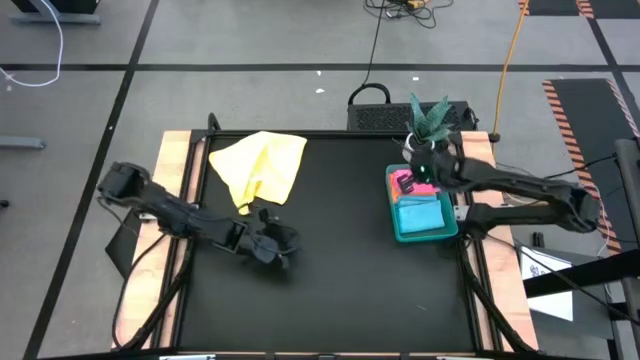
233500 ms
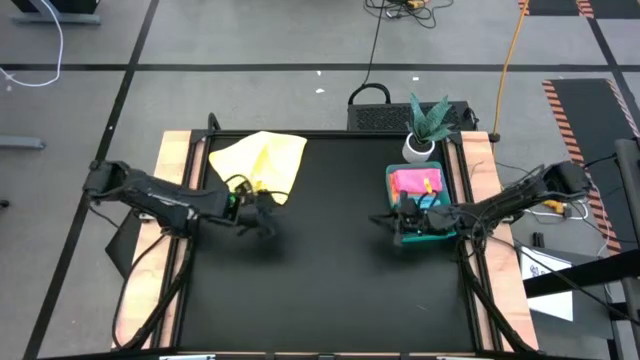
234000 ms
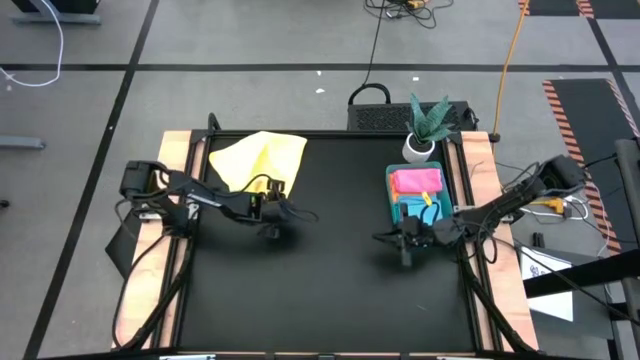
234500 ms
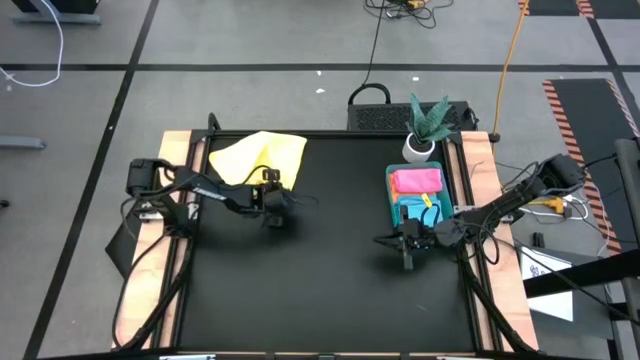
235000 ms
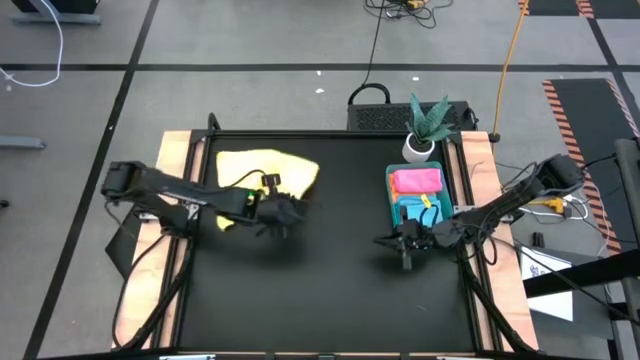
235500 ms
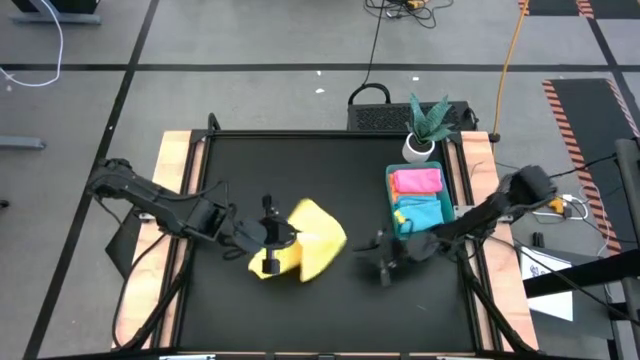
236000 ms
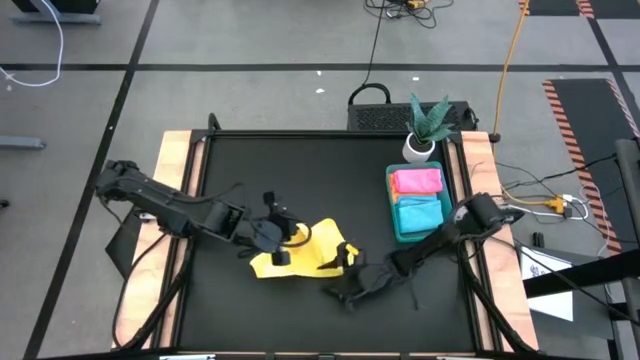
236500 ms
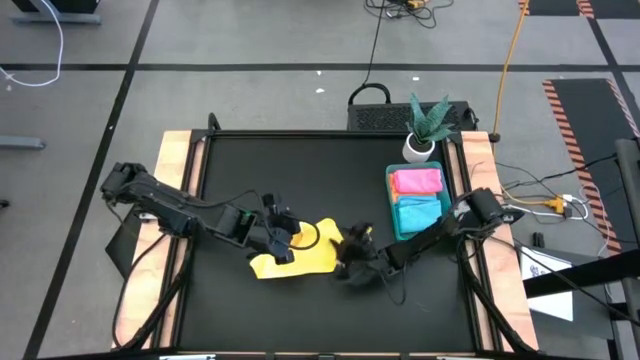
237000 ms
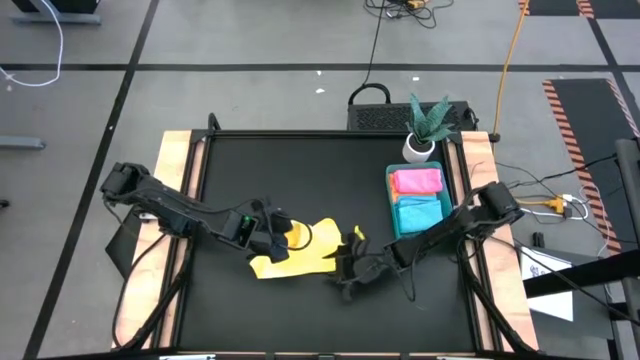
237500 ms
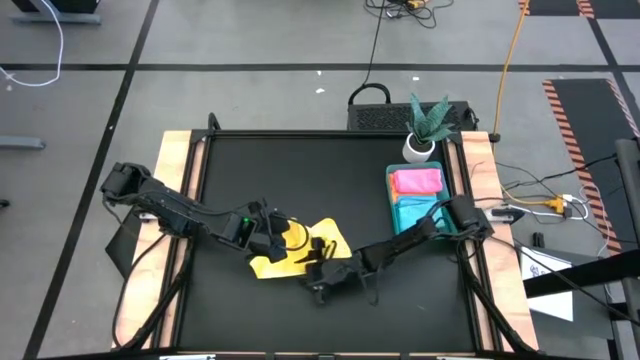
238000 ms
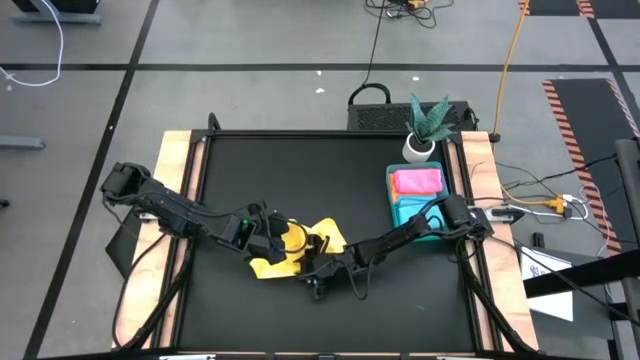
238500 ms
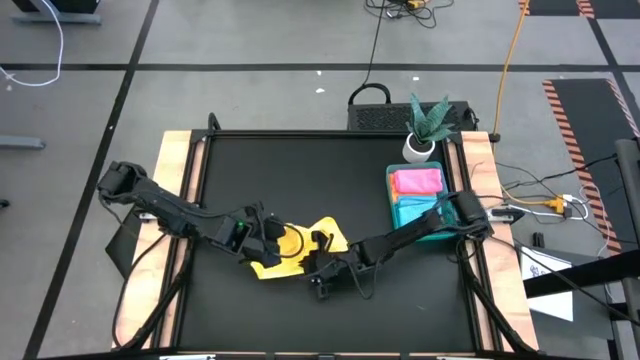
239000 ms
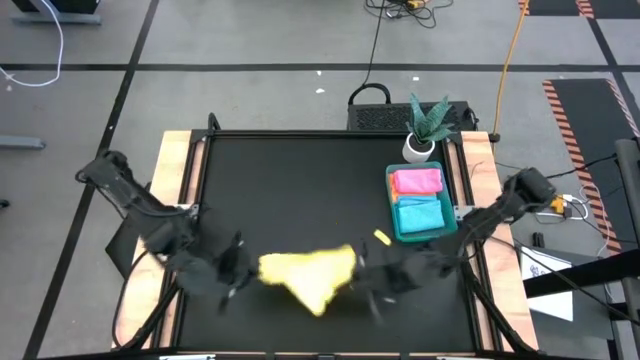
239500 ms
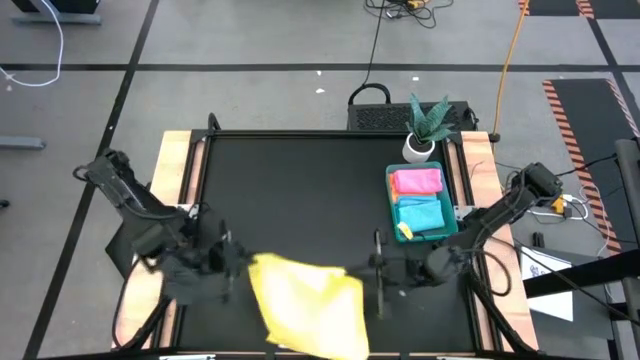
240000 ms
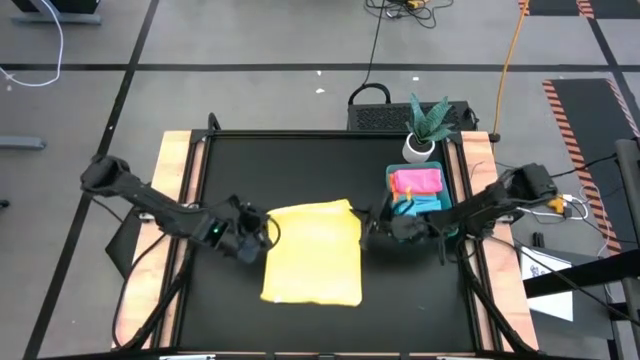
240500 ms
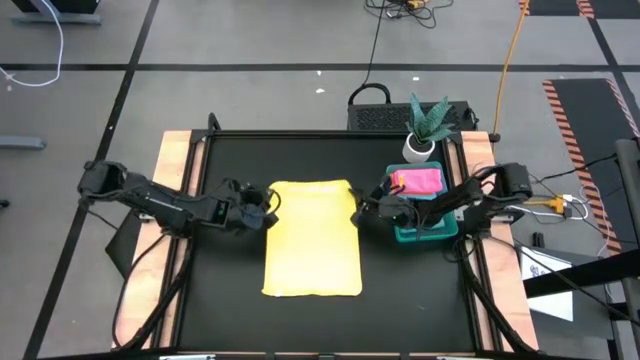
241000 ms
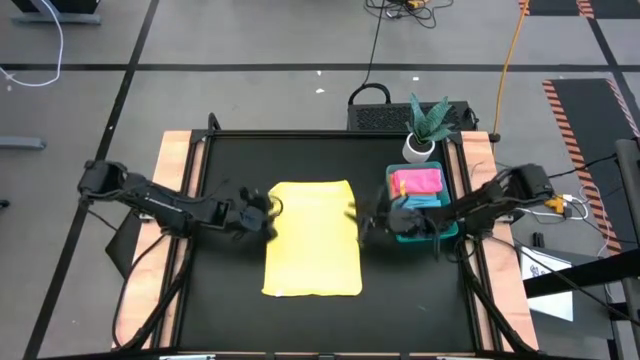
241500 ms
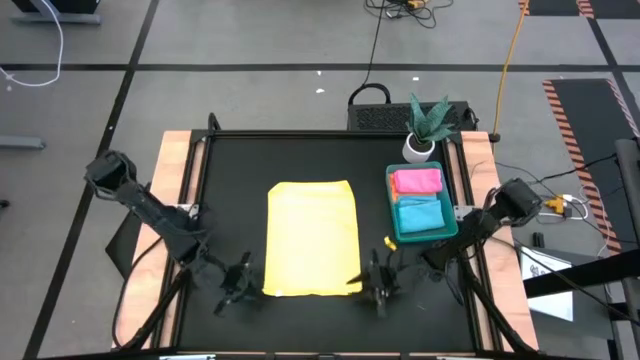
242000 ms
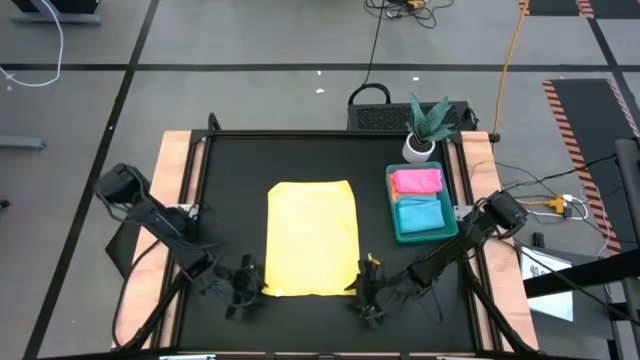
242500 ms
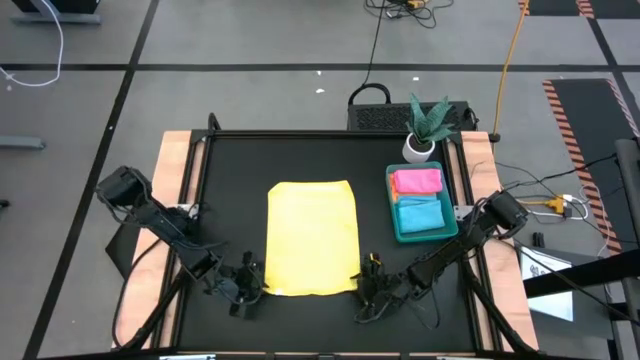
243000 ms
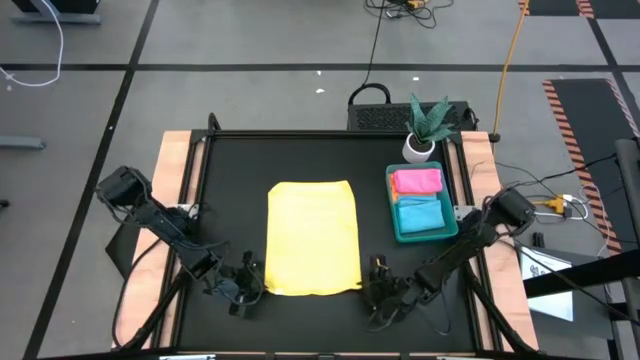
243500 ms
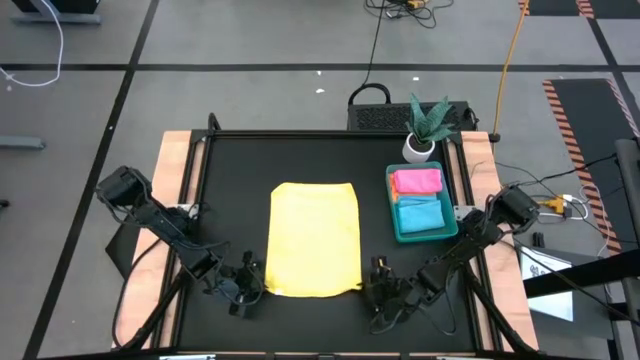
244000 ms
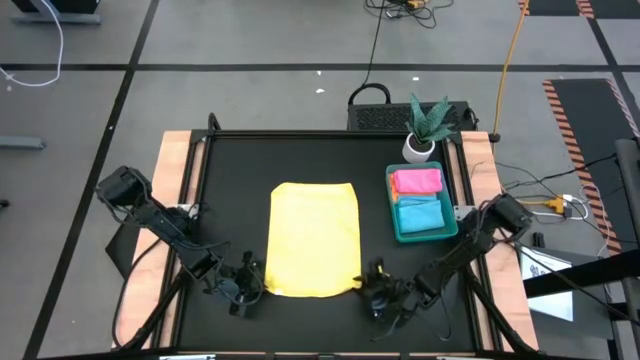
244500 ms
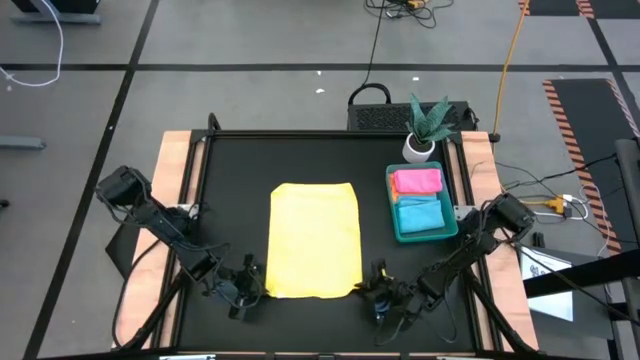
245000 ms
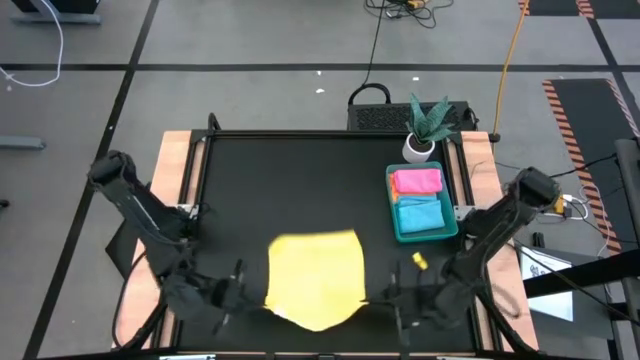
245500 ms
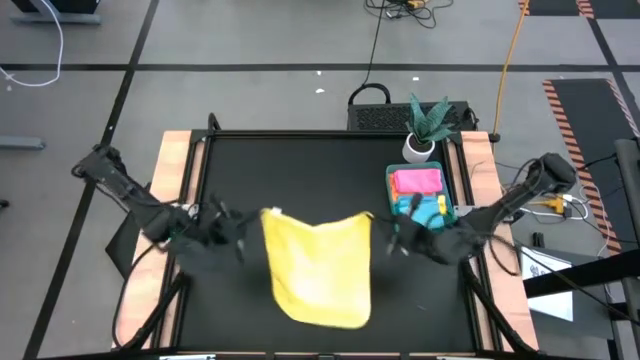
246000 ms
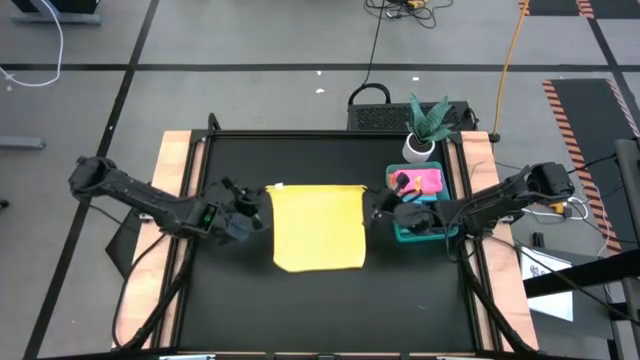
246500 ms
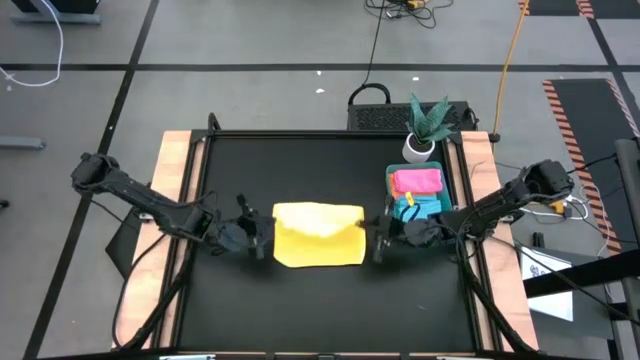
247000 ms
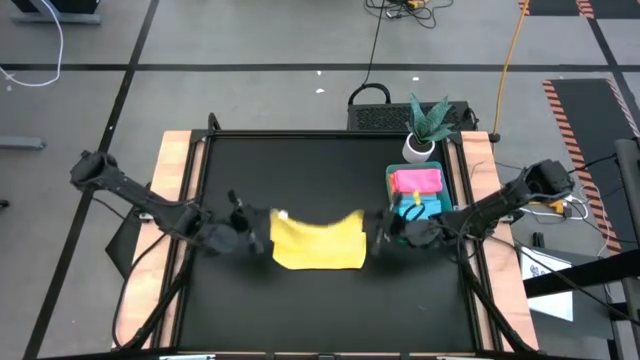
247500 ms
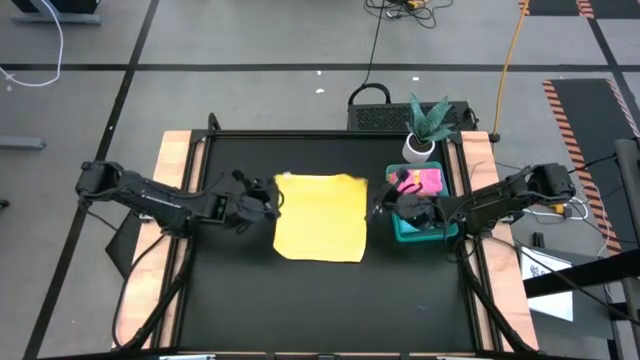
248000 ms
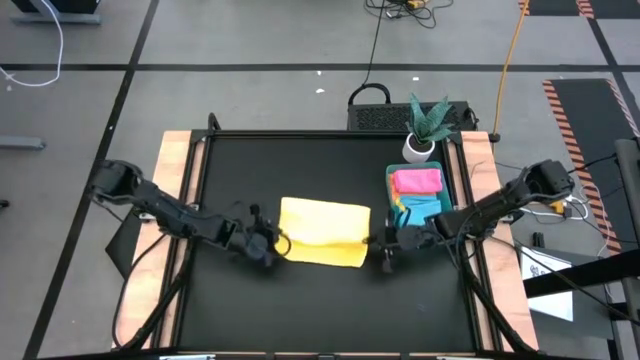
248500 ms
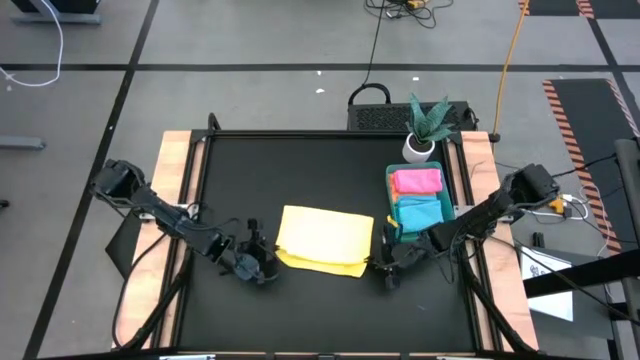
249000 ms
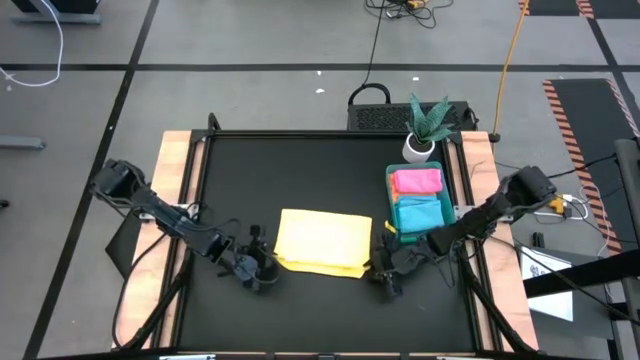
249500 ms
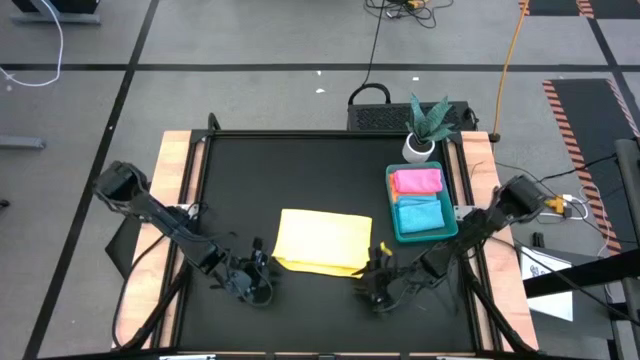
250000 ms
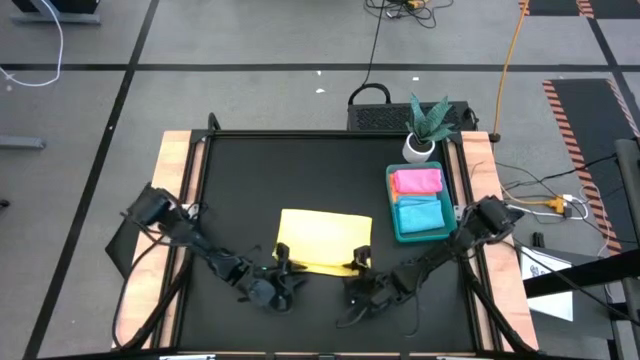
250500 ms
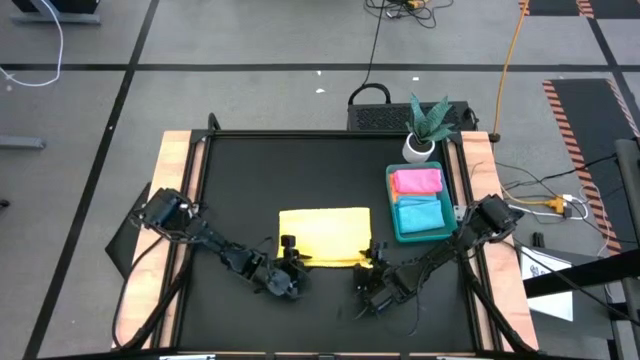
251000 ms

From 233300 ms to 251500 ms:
Task: Fold microfiber towels
Fold the yellow microfiber cloth

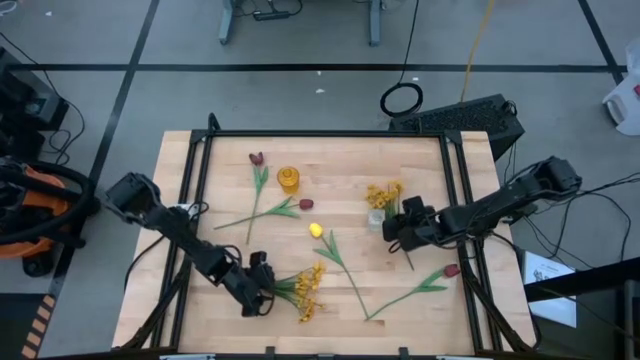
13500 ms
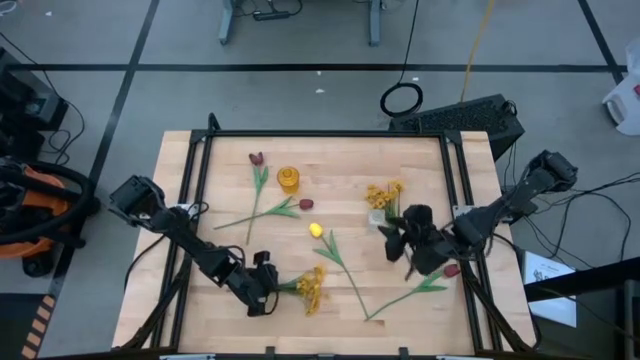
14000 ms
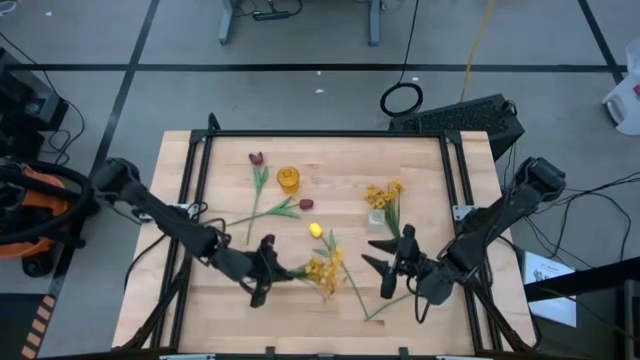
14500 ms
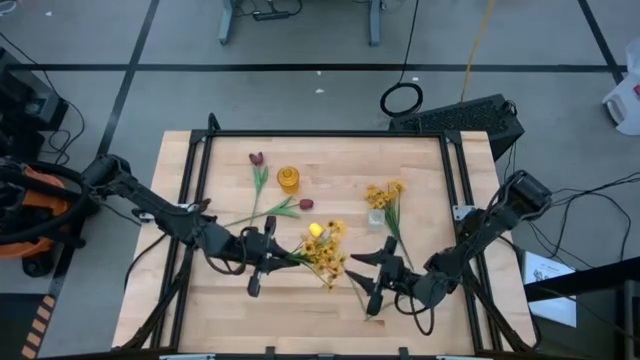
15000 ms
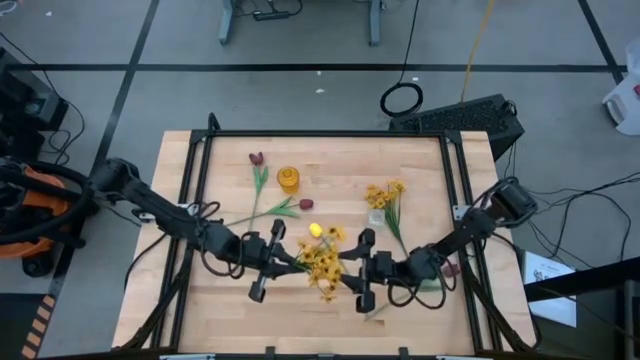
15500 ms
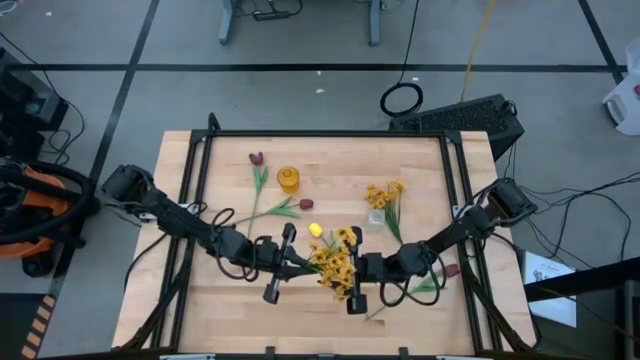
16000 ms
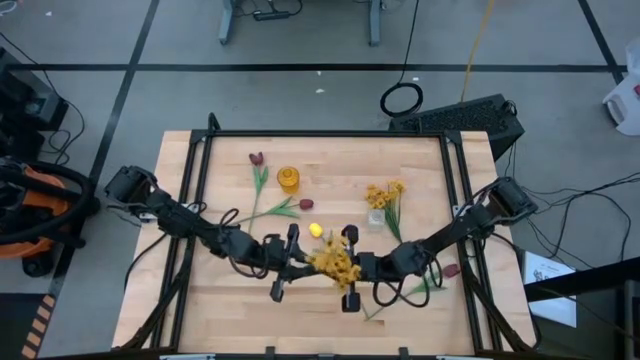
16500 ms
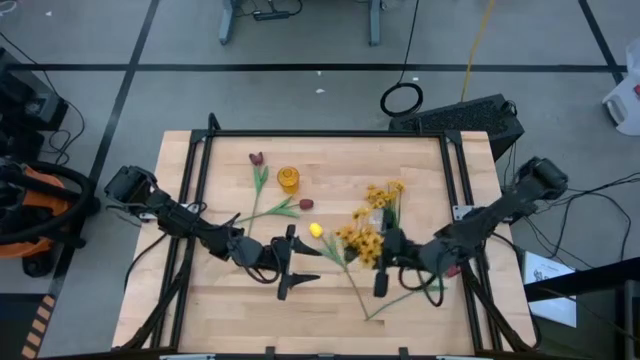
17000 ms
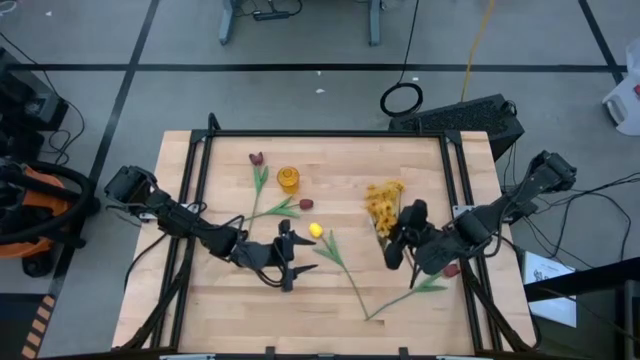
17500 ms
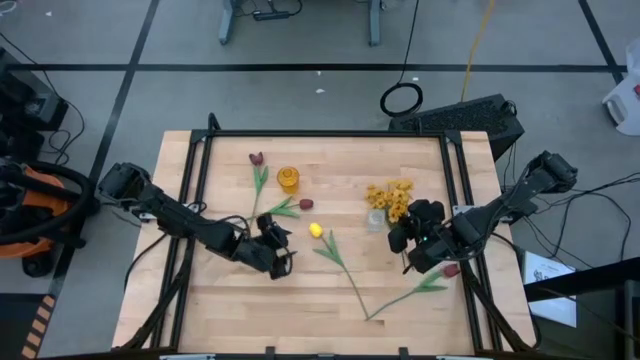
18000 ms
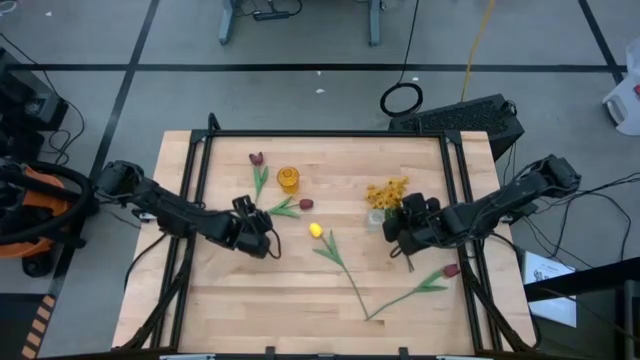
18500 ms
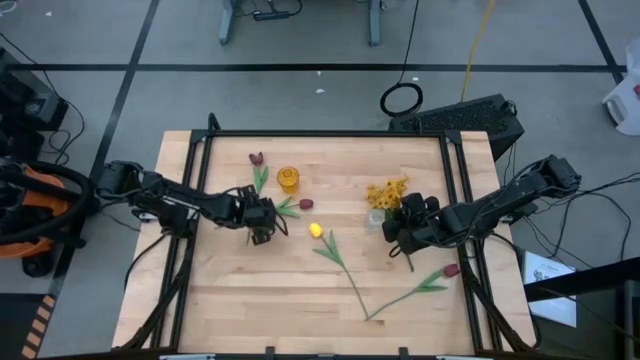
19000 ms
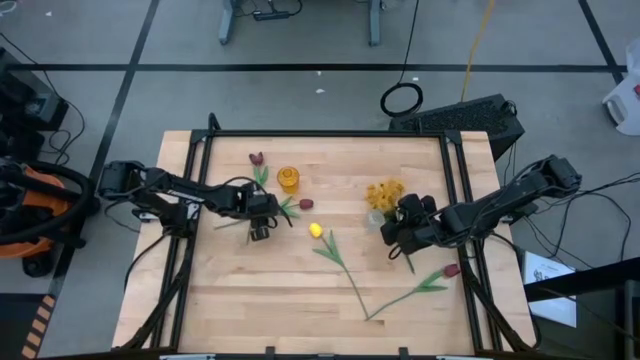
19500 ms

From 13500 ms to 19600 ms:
Task: Sort flowers into vase by color
Move the yellow flower on top of the other yellow flower
